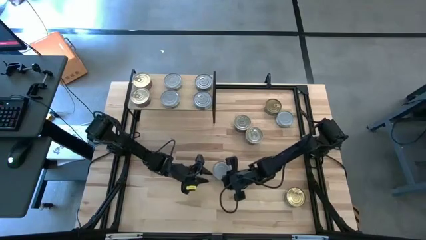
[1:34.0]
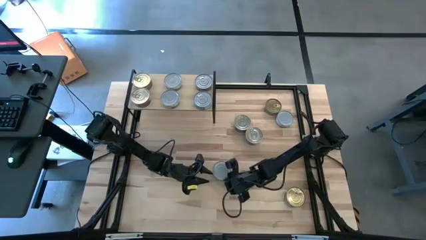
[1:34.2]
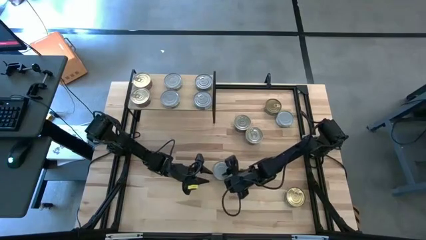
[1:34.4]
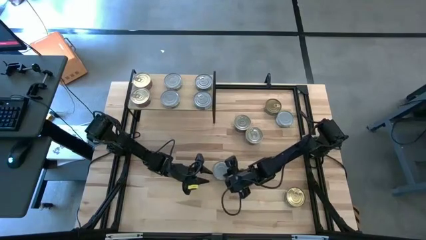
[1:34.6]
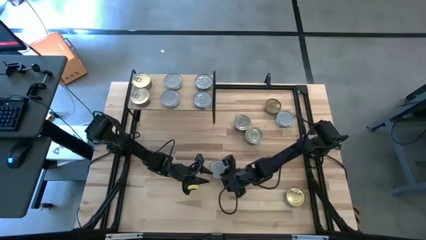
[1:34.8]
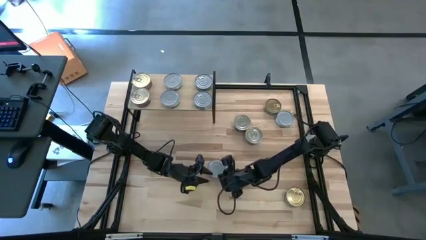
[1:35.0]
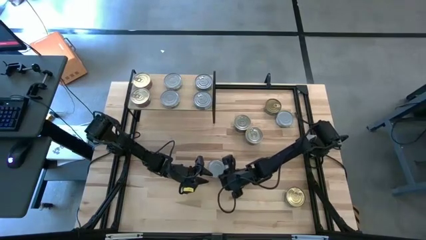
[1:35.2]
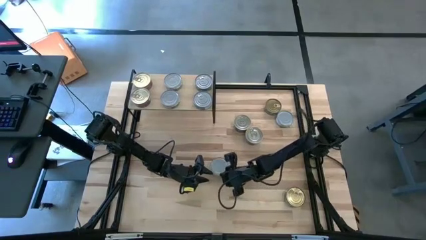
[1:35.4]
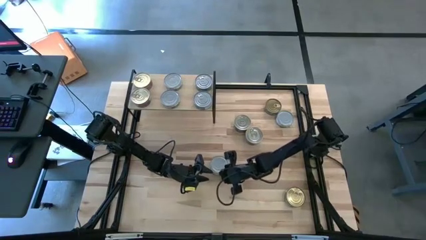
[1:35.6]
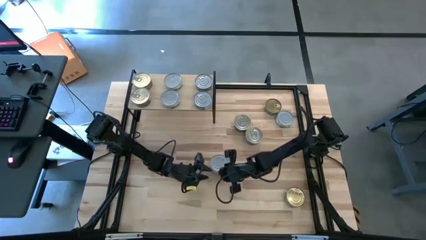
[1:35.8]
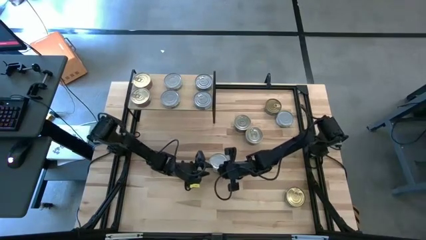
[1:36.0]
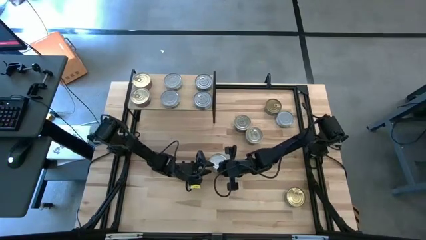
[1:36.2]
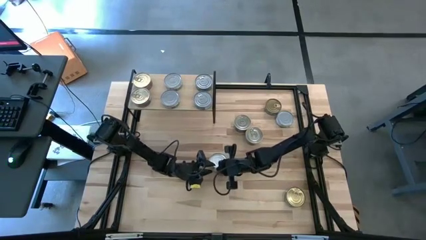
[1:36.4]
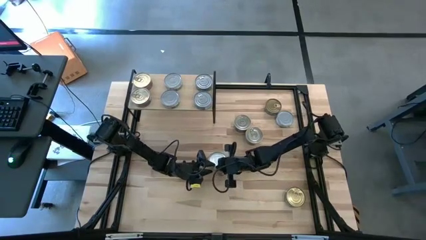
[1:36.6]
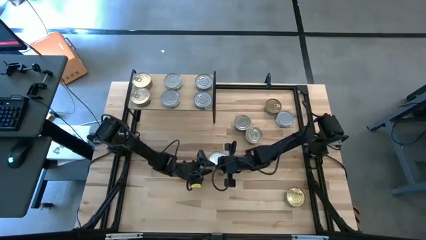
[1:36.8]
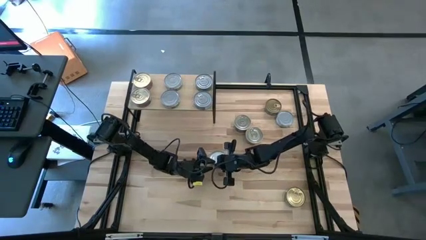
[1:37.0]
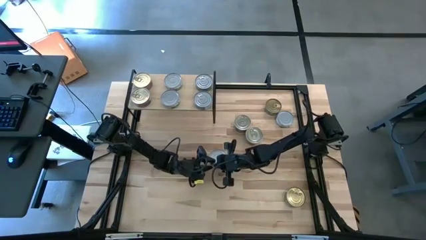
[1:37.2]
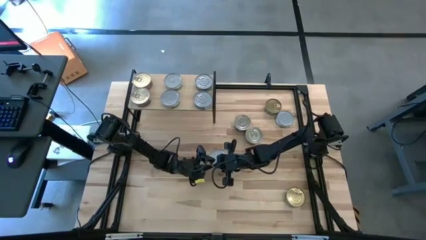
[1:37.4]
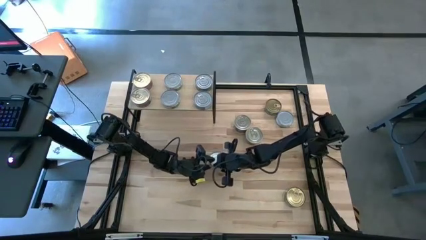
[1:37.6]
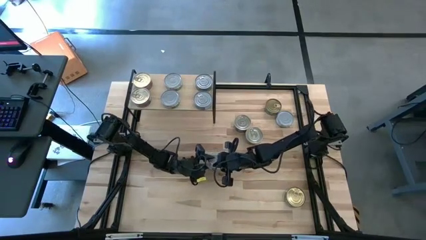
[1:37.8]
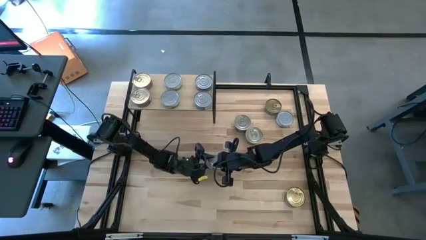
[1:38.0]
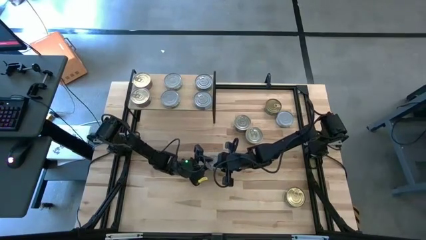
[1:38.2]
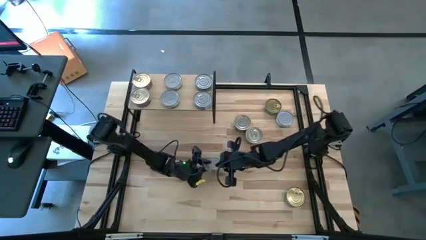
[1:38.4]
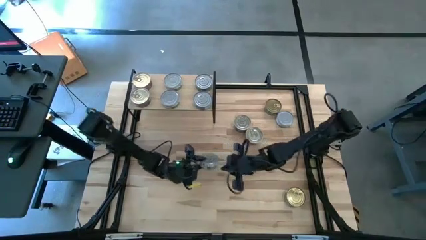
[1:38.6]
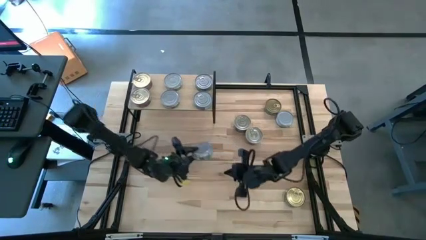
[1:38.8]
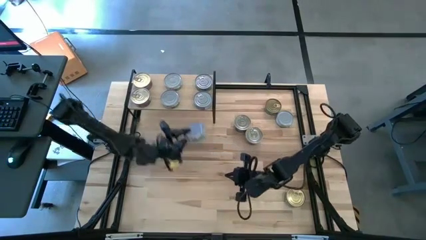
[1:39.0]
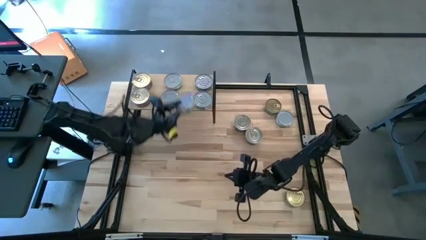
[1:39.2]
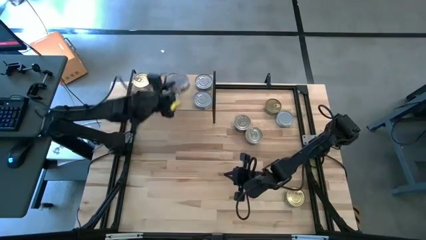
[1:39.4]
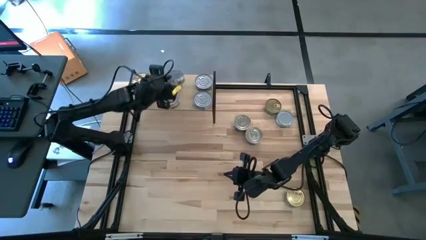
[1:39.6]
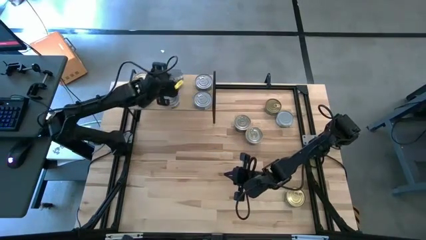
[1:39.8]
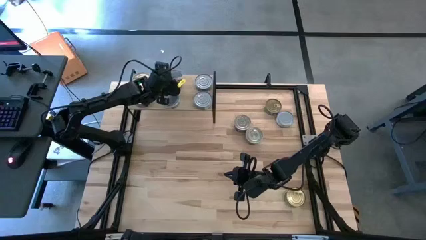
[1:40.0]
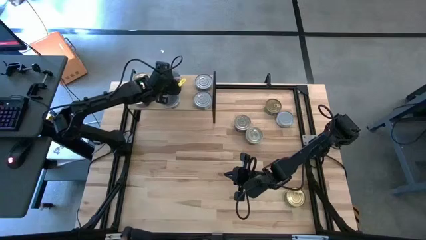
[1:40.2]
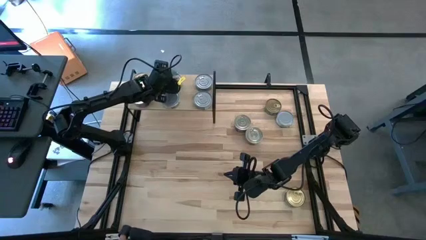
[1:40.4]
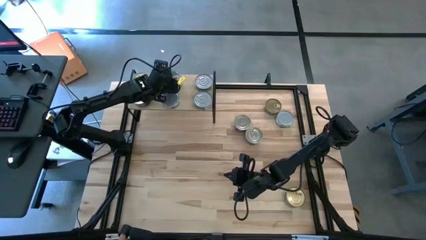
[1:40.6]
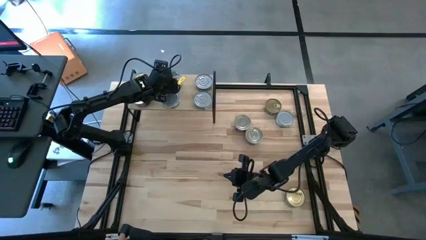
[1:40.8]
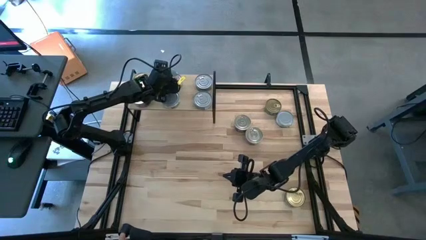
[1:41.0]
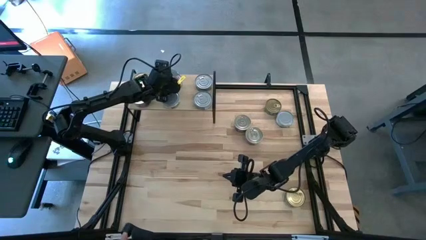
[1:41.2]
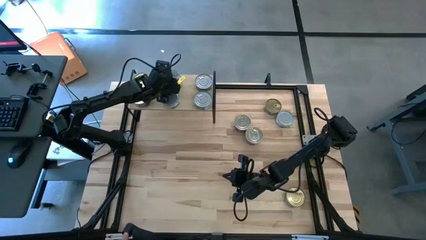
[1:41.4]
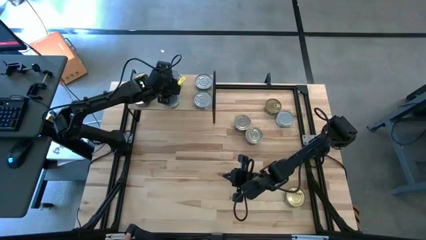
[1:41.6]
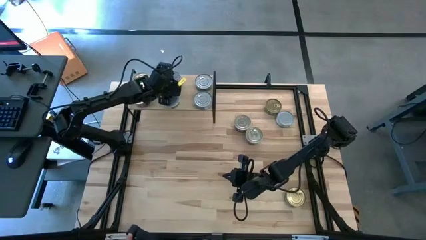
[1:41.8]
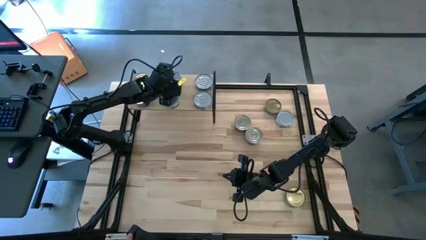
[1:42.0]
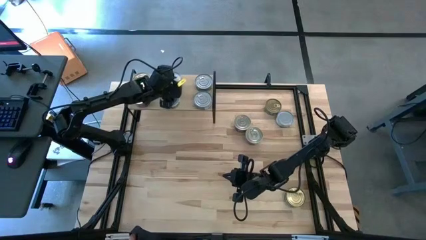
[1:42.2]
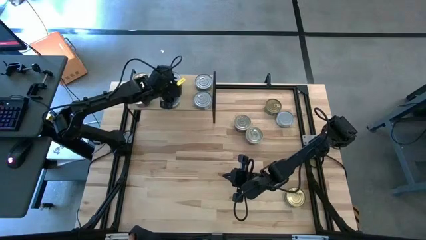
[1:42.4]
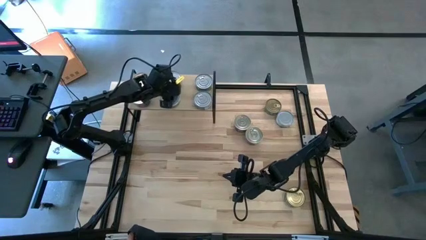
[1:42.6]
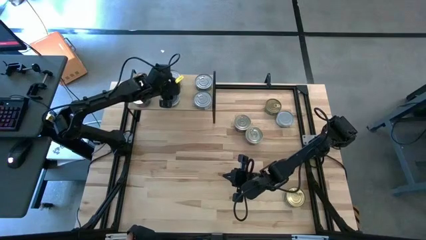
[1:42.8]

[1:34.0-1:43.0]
Task: Stack canned seafood by type on shelf
Stack the green white tuna can on top of the other green white tuna can on the shelf

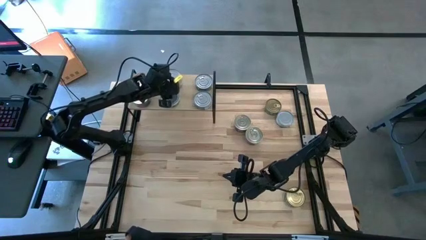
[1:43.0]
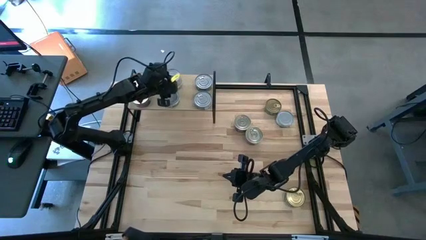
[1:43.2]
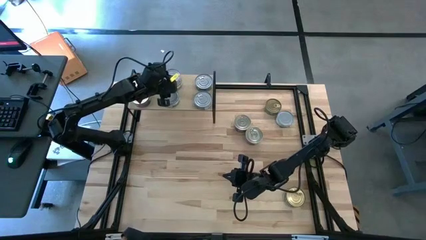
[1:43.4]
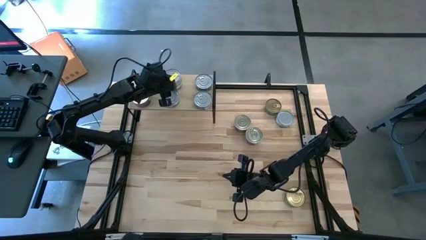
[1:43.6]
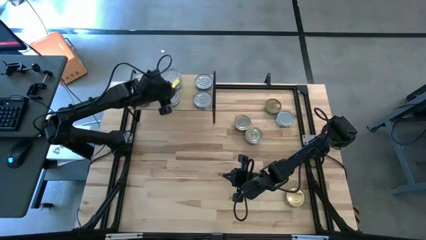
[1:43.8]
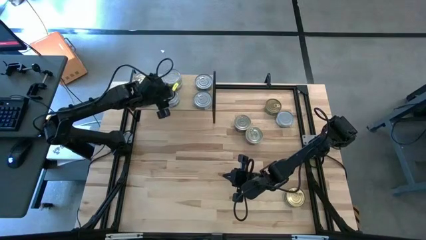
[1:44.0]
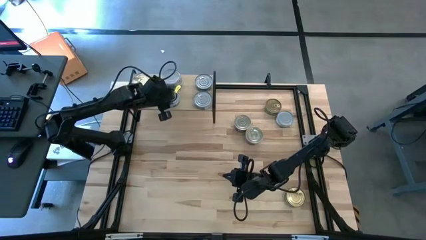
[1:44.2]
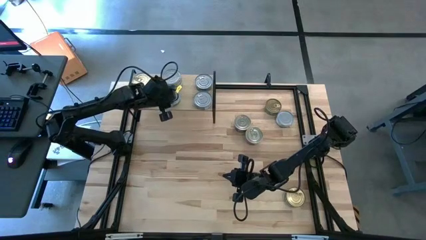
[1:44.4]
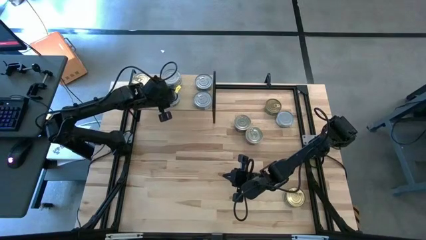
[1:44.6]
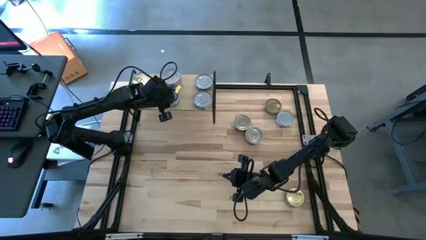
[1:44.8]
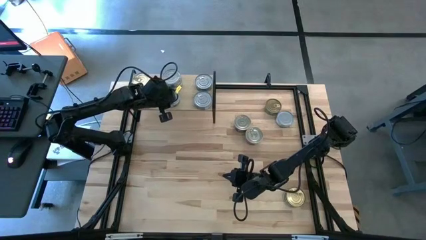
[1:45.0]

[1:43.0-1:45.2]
Adjust the green white tuna can on the shelf
